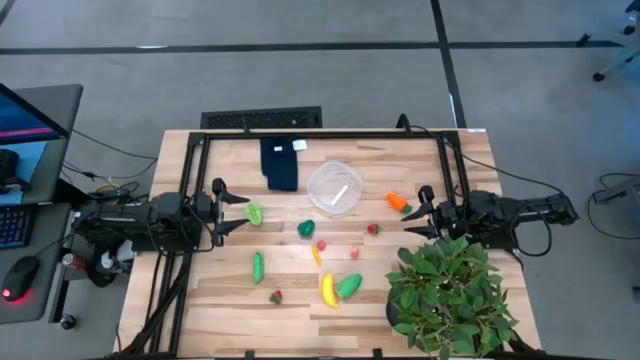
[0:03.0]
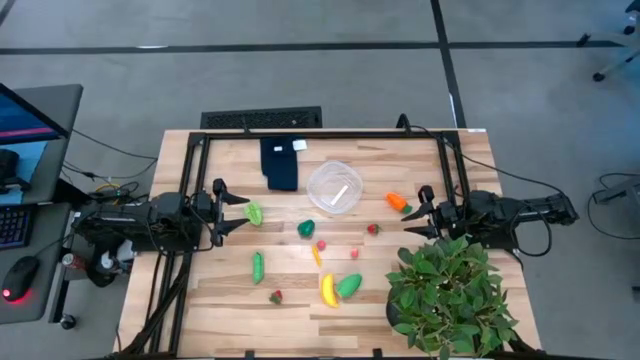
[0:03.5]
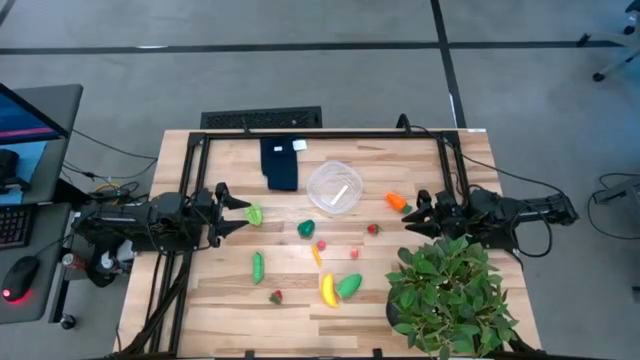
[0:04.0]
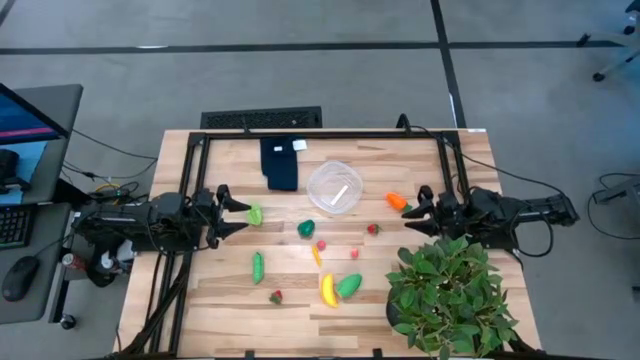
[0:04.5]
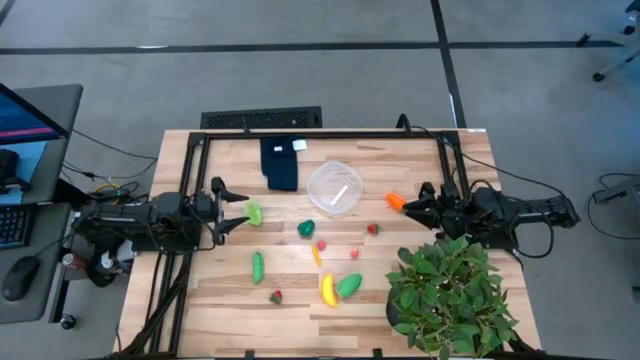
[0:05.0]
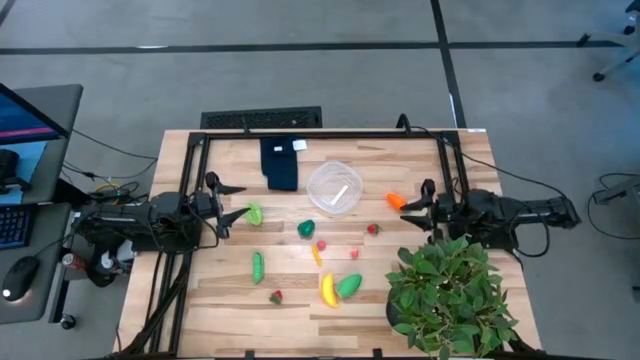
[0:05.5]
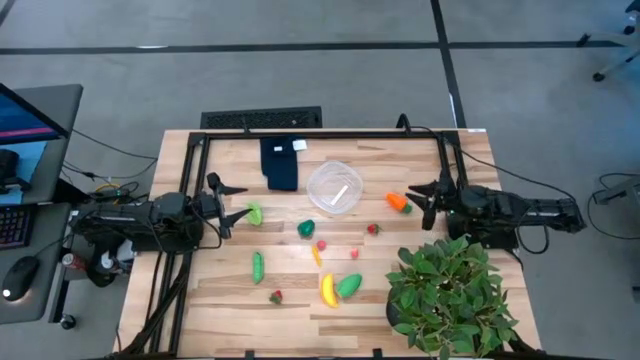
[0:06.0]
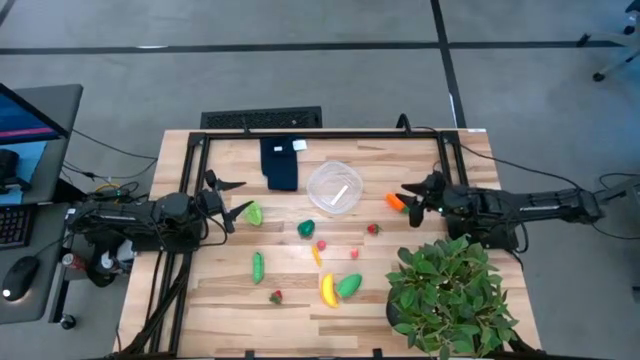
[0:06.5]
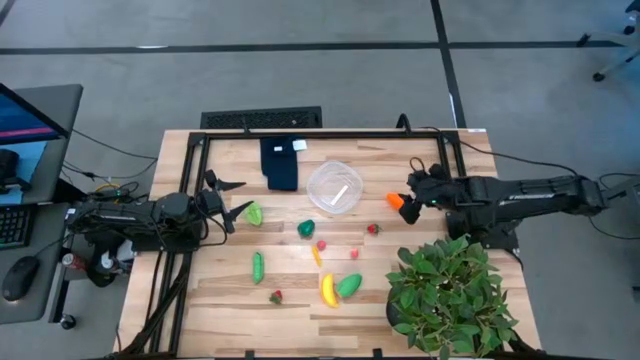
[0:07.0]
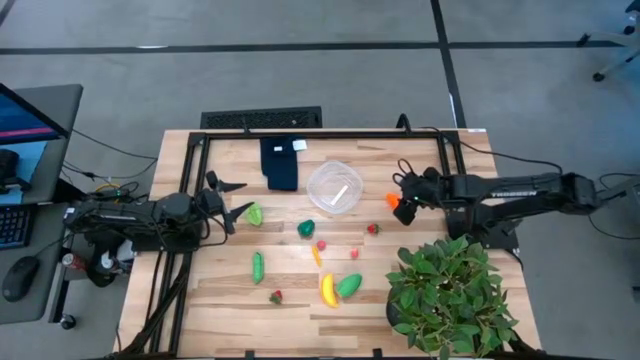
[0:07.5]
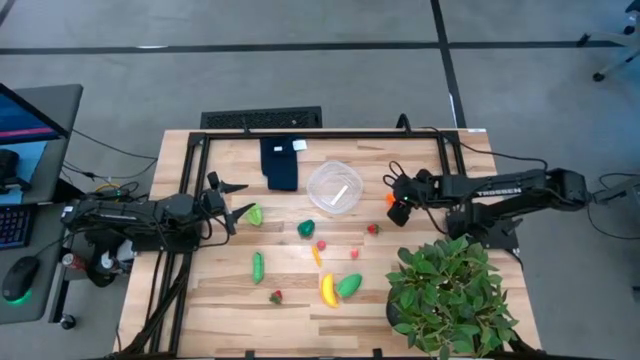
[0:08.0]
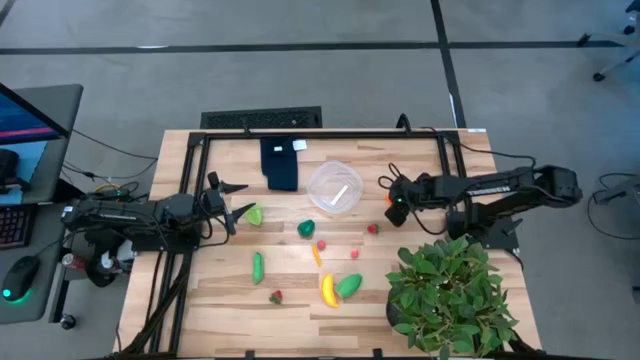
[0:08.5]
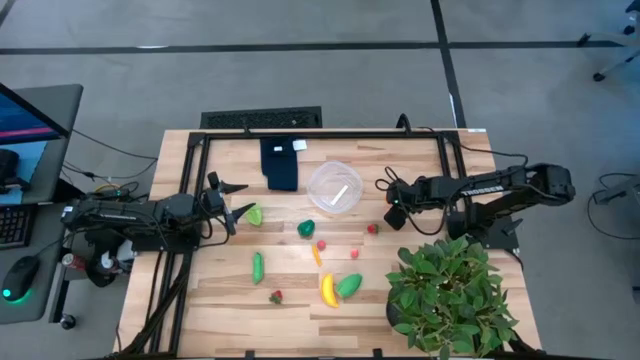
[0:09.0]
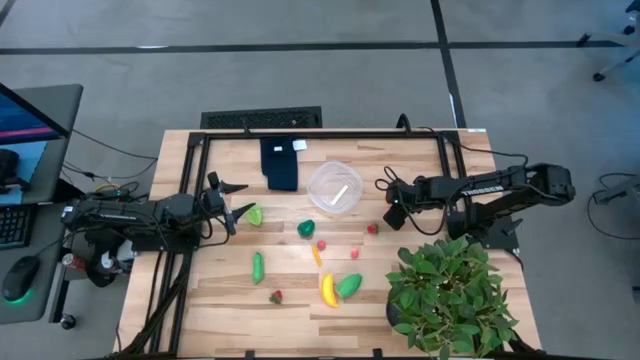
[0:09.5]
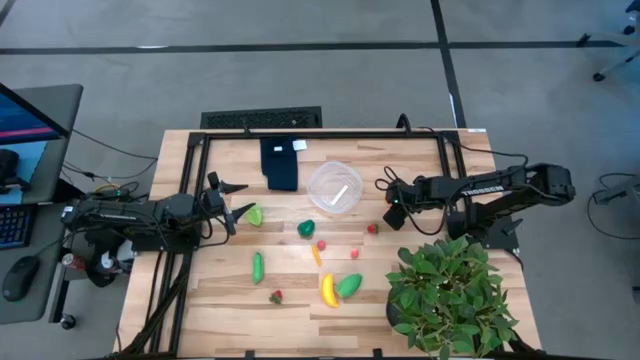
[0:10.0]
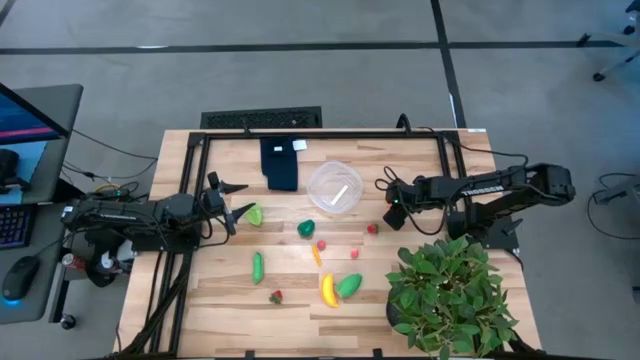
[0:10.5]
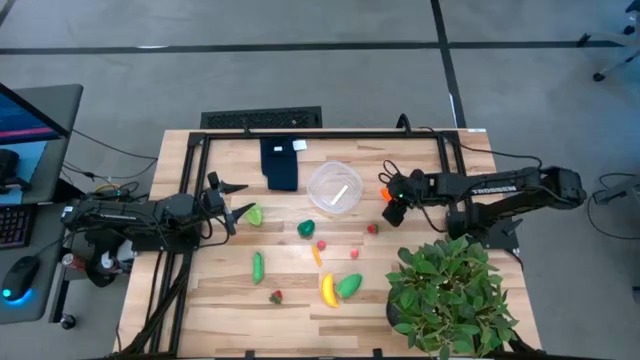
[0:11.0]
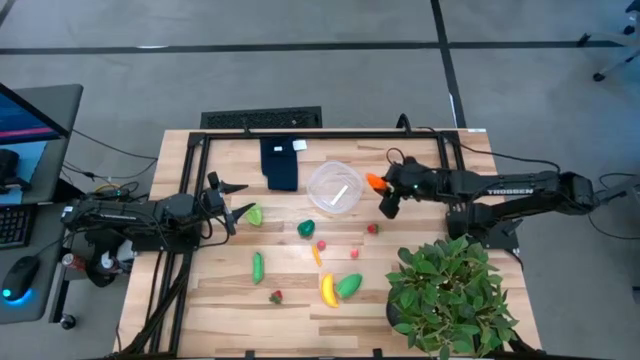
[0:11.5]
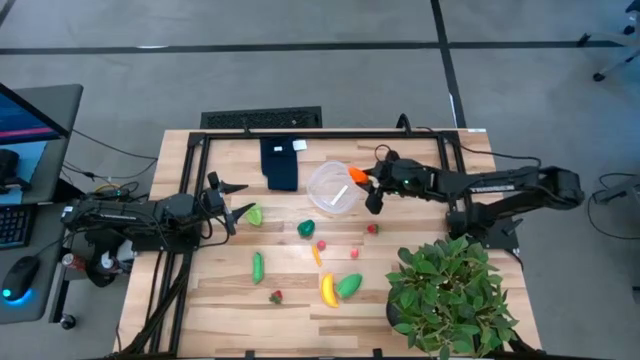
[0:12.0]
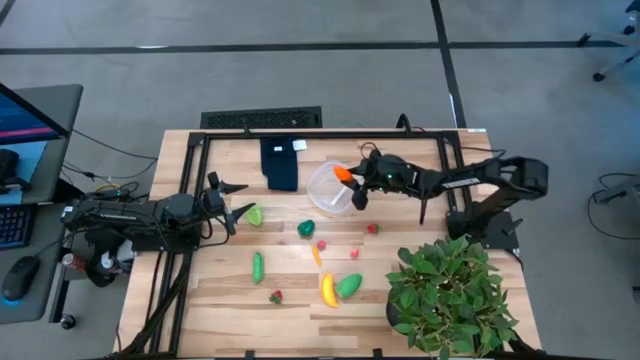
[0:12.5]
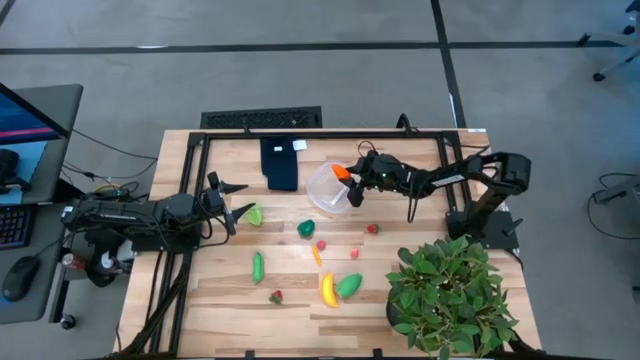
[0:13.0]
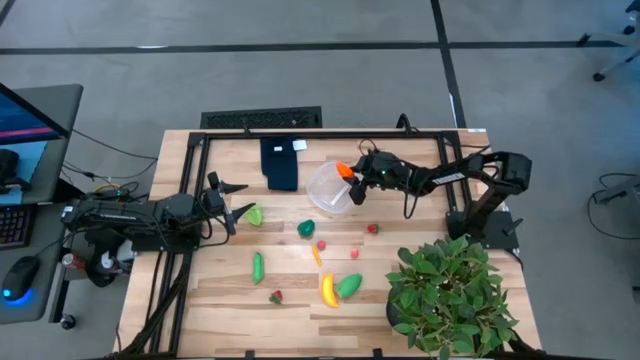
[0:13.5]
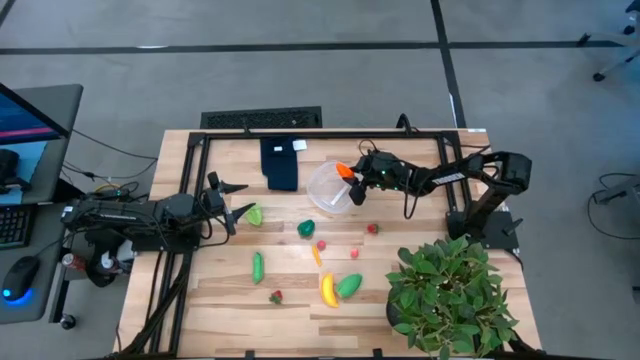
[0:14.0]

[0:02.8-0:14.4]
Task: Pick and placing Produce into tupperware
Put the orange carrot into the transparent container

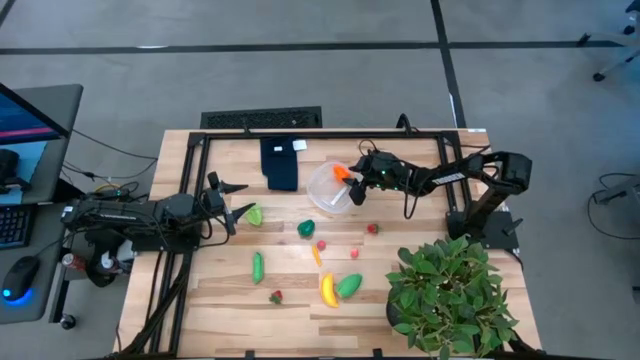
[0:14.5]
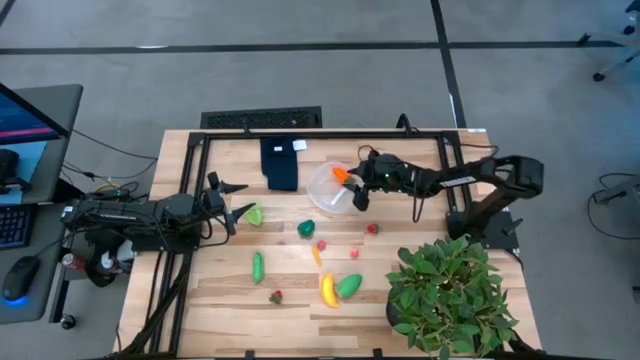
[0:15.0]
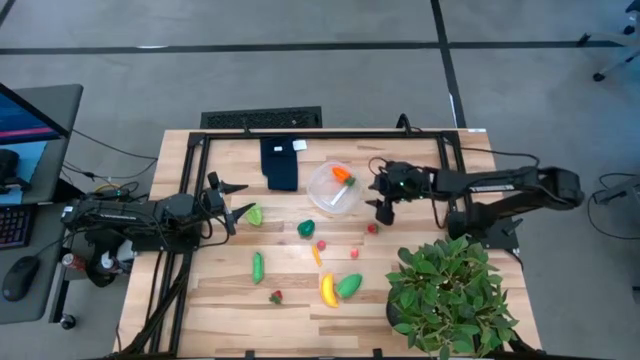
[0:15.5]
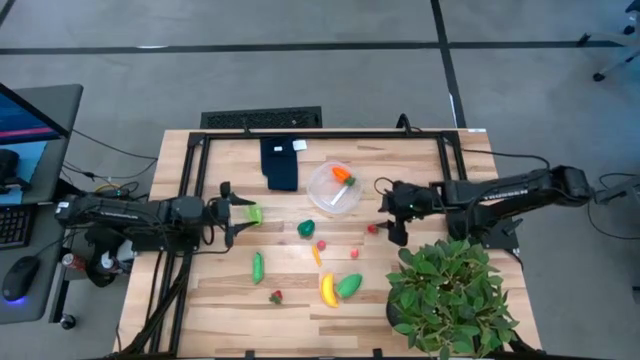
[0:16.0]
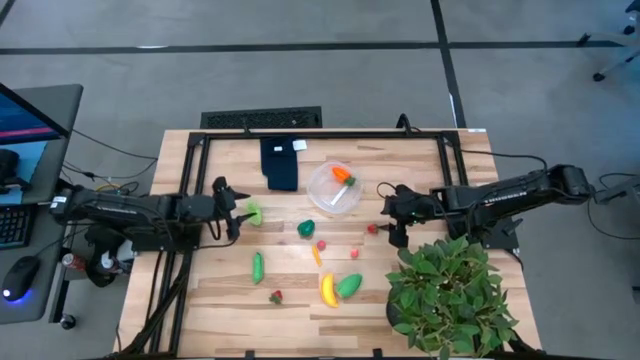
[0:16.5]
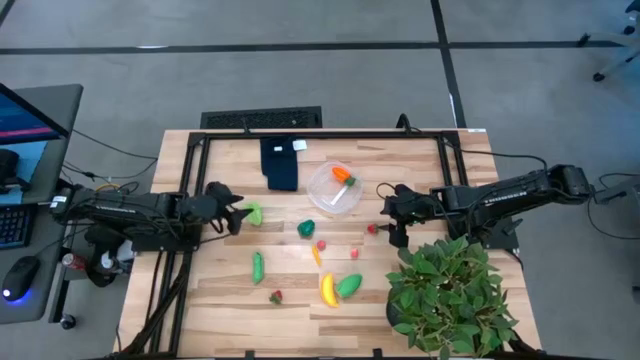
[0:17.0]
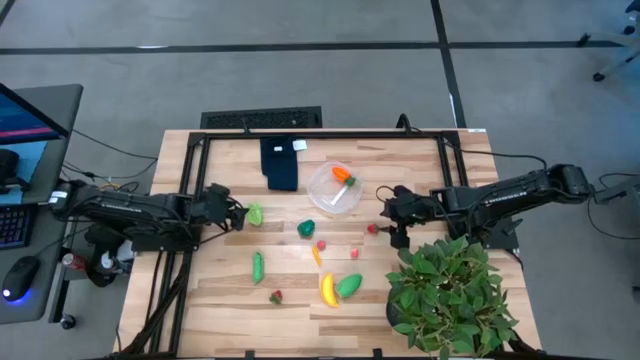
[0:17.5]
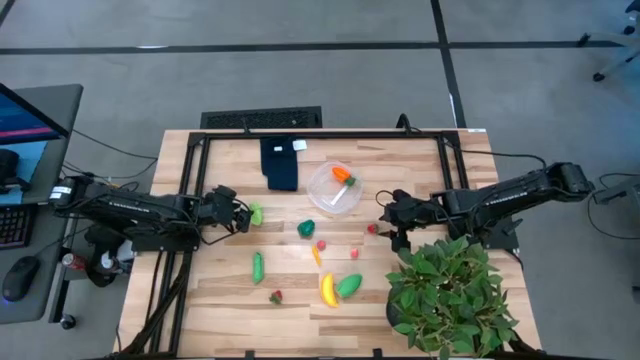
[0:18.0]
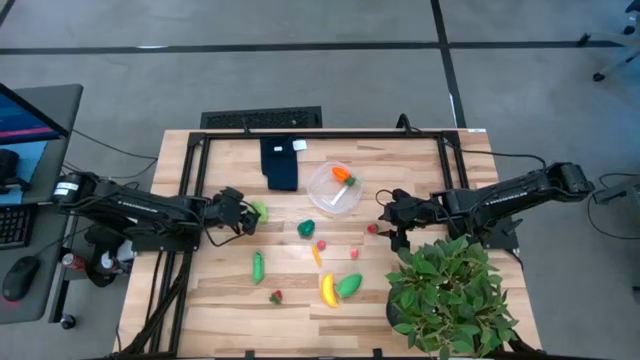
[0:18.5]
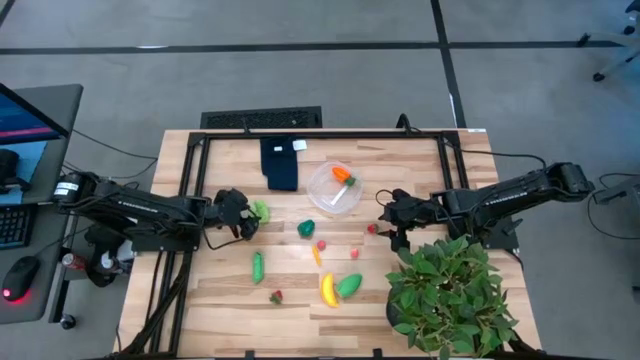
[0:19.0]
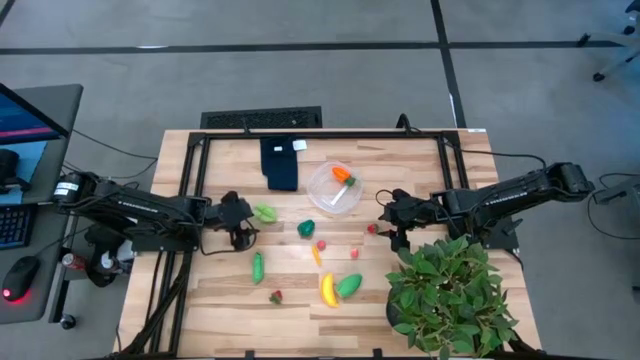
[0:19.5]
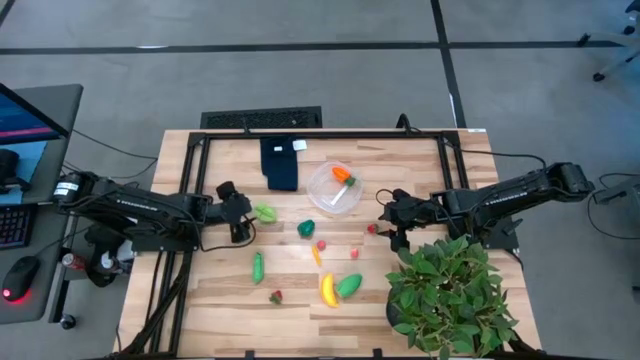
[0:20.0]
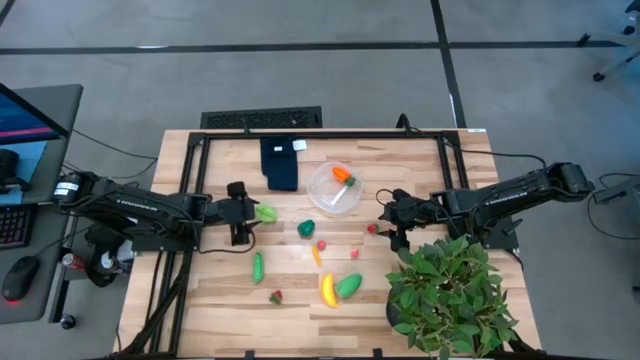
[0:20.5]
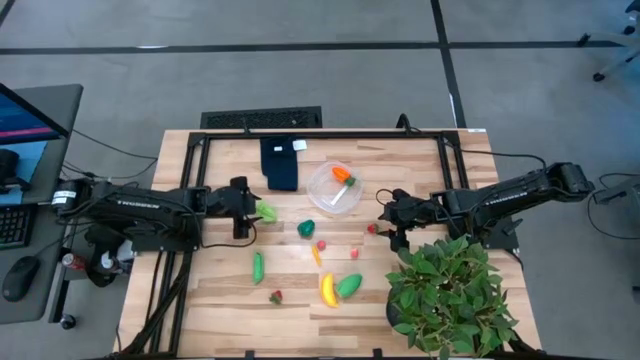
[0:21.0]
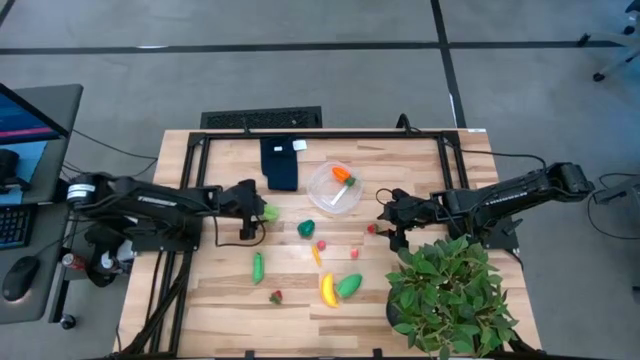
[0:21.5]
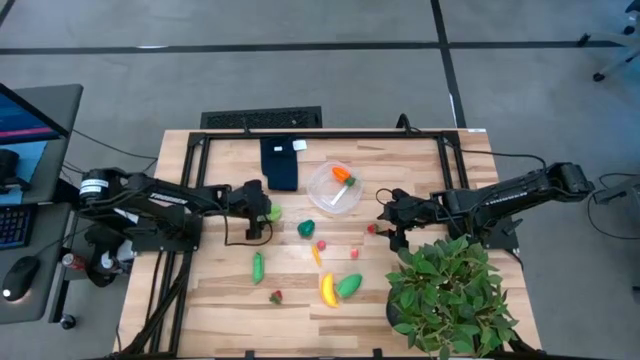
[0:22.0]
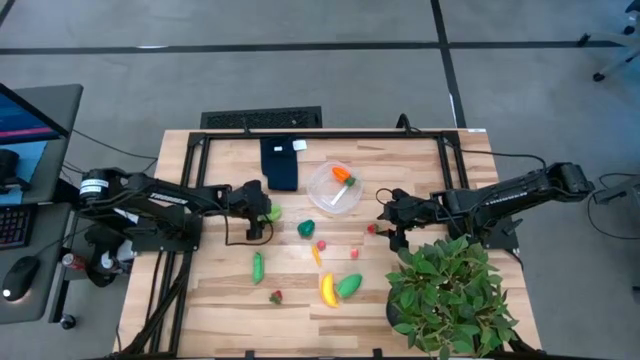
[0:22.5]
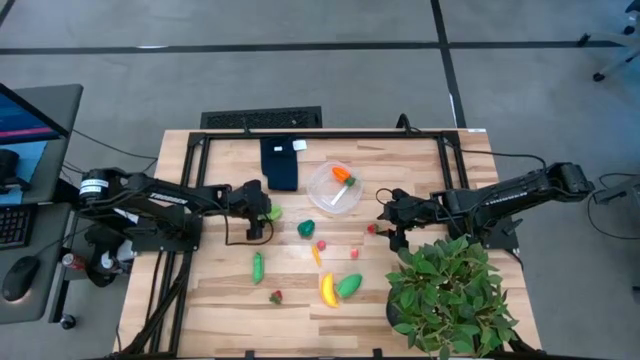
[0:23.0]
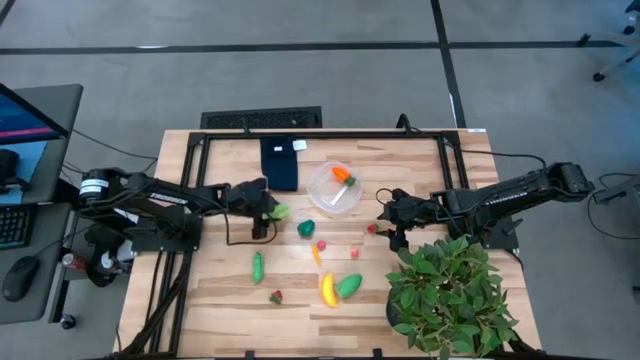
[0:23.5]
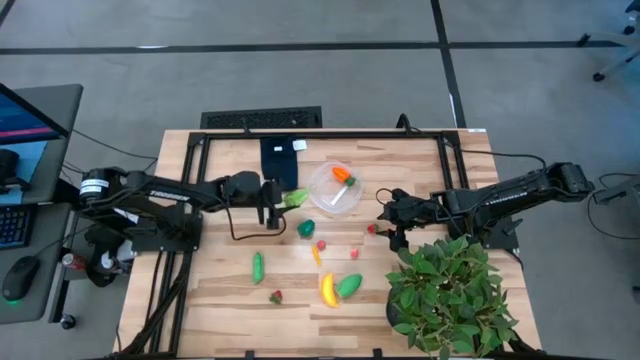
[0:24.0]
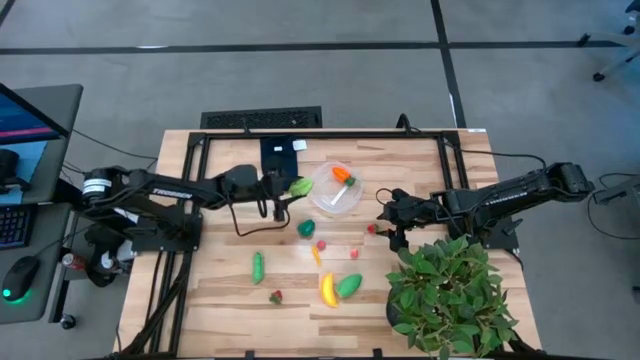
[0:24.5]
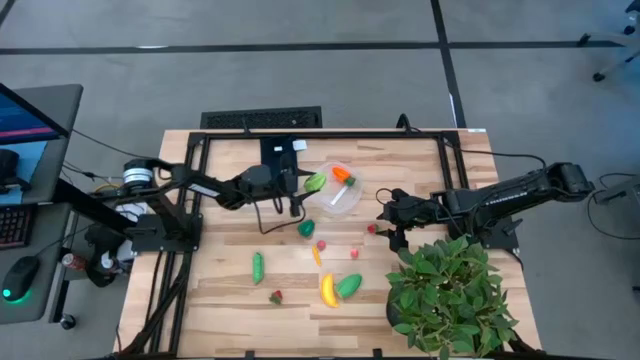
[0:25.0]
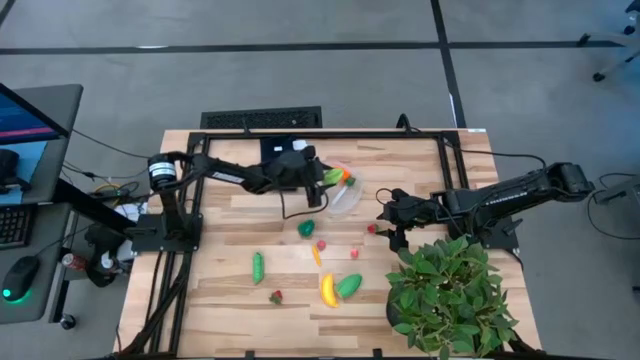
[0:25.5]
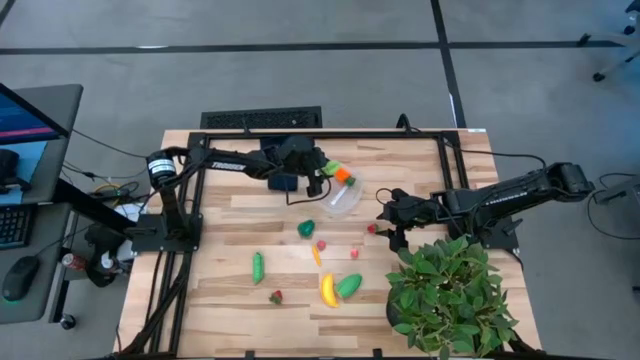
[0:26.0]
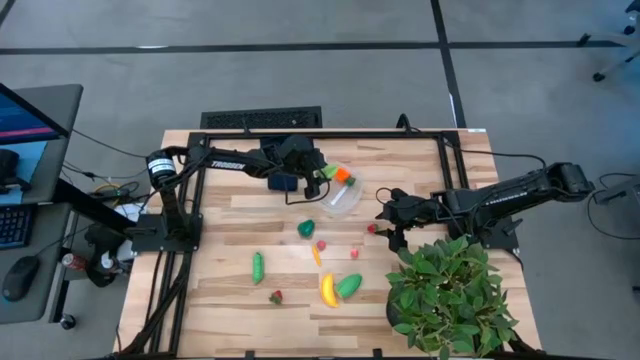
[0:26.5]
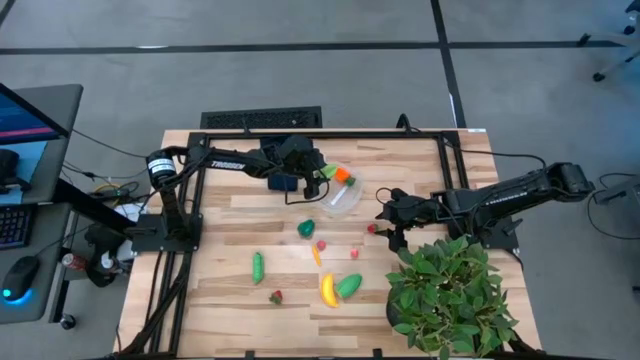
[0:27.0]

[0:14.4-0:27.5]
Put the starfruit into the transparent container
